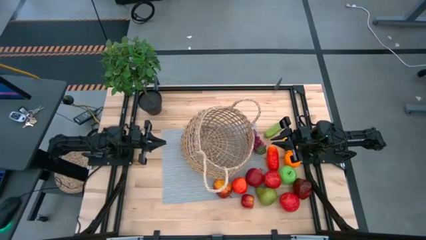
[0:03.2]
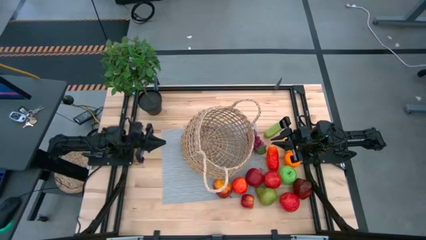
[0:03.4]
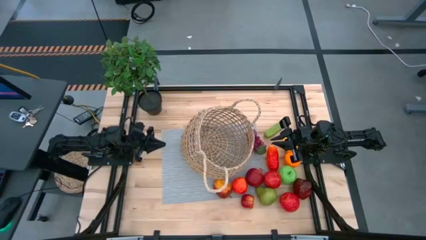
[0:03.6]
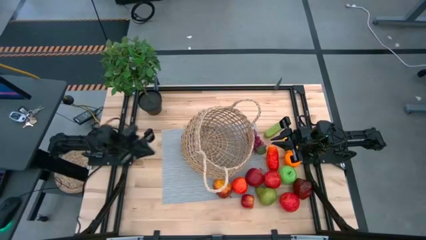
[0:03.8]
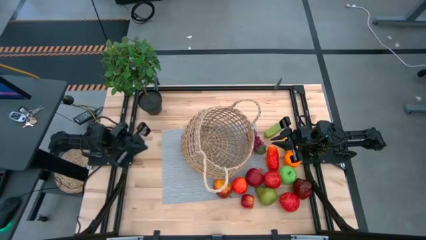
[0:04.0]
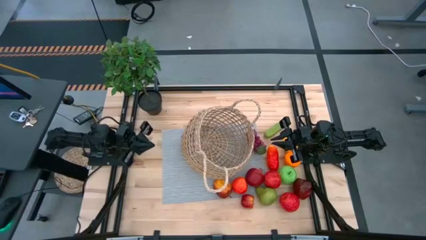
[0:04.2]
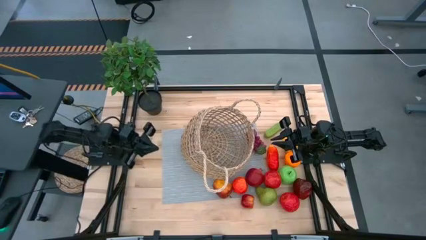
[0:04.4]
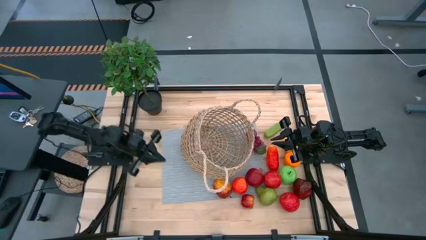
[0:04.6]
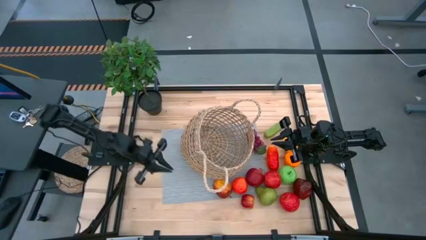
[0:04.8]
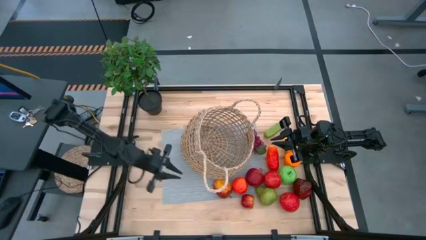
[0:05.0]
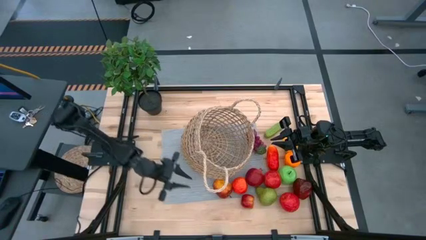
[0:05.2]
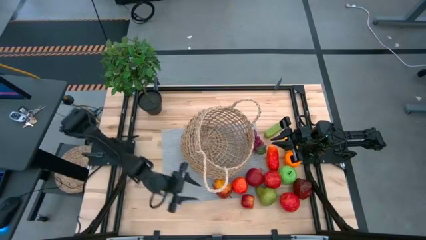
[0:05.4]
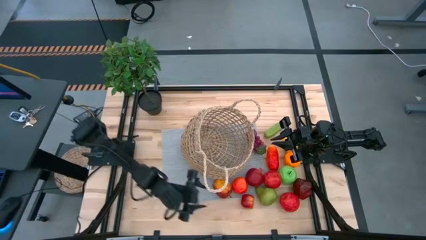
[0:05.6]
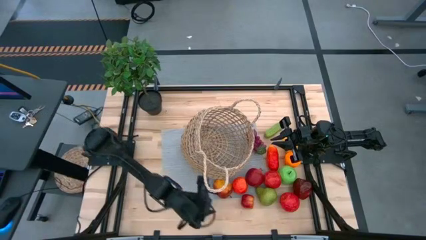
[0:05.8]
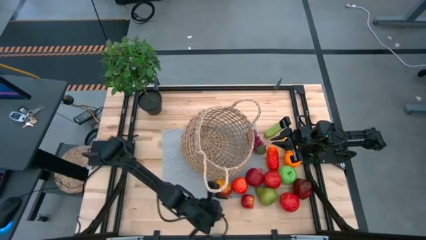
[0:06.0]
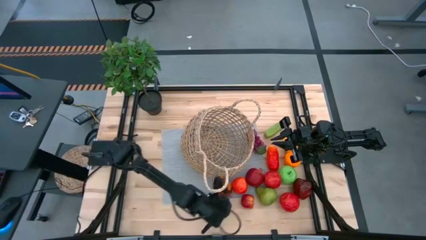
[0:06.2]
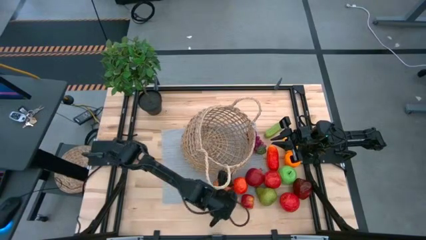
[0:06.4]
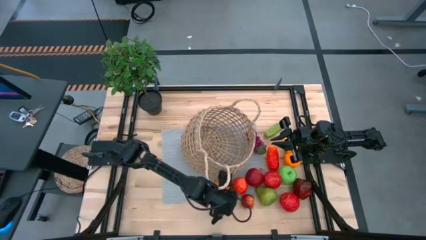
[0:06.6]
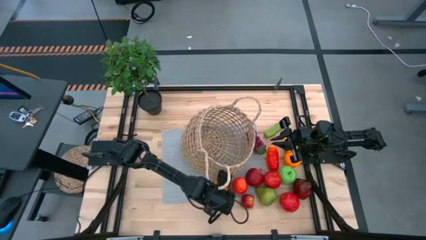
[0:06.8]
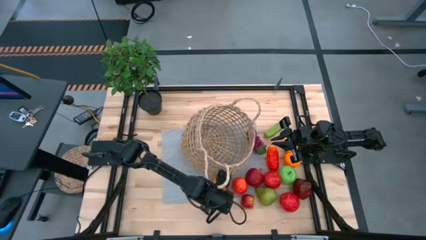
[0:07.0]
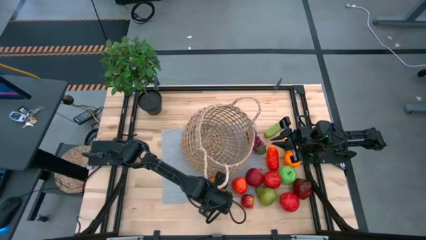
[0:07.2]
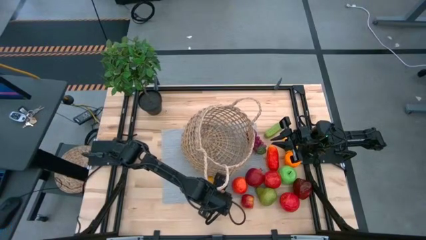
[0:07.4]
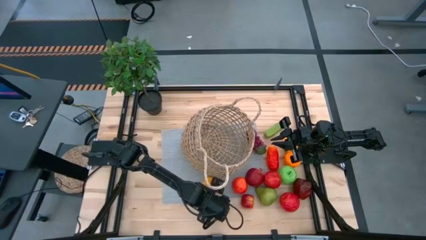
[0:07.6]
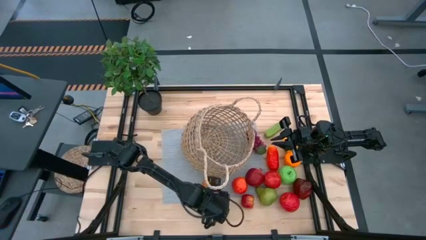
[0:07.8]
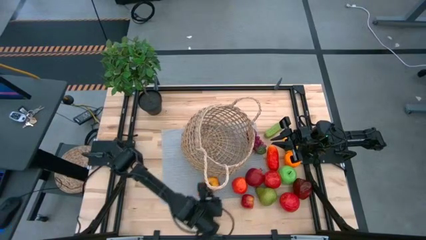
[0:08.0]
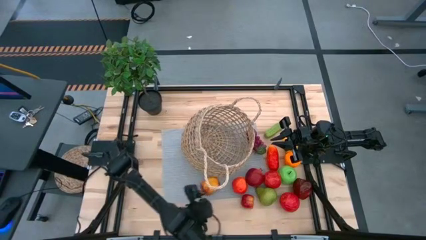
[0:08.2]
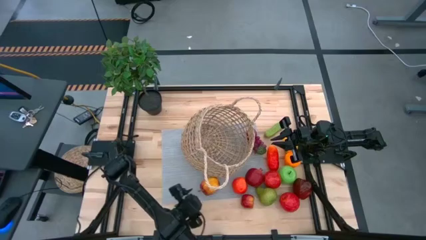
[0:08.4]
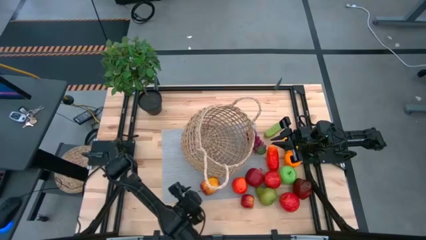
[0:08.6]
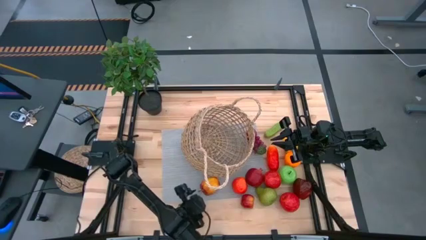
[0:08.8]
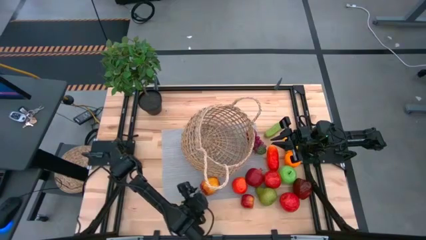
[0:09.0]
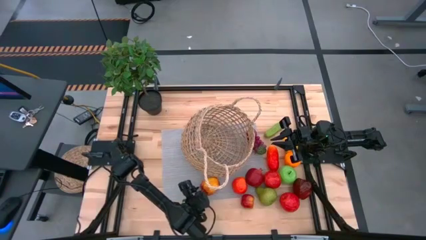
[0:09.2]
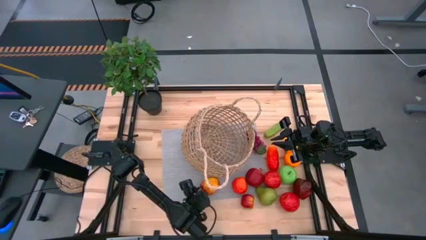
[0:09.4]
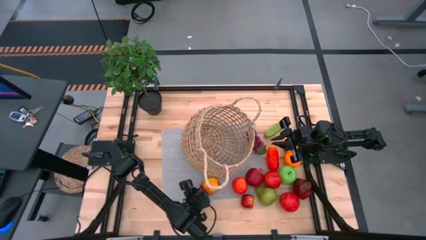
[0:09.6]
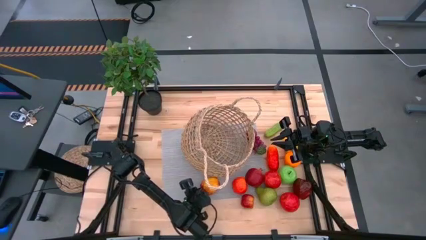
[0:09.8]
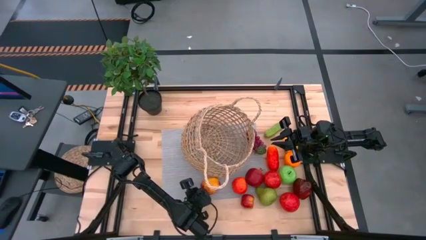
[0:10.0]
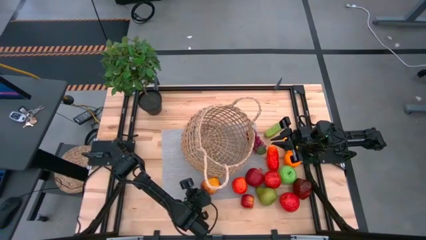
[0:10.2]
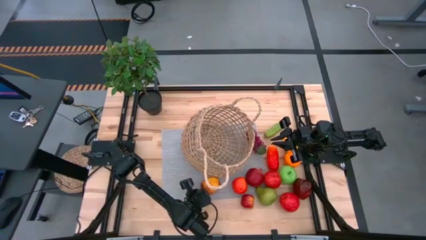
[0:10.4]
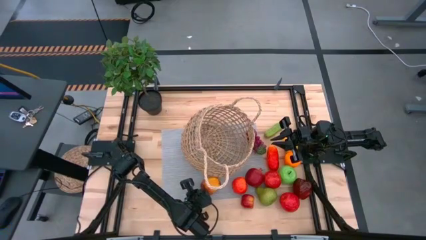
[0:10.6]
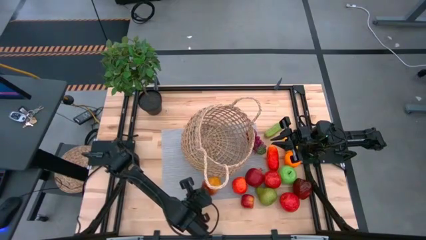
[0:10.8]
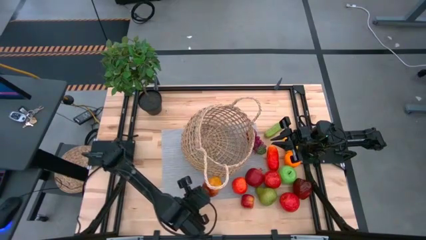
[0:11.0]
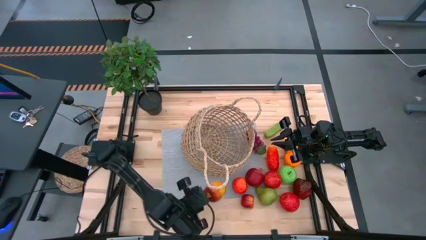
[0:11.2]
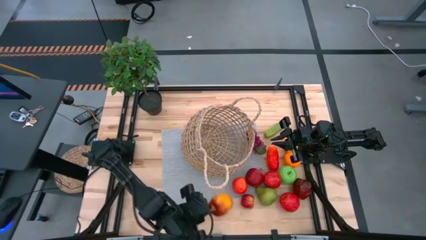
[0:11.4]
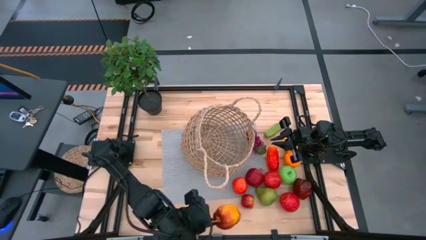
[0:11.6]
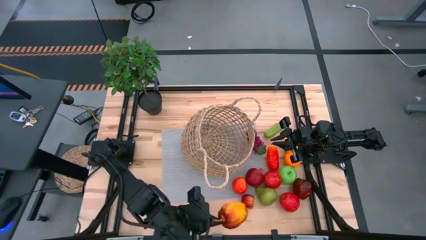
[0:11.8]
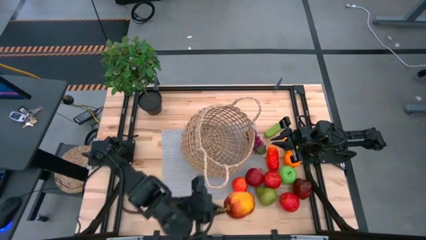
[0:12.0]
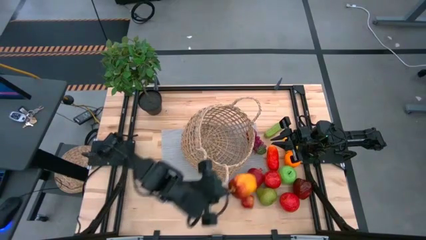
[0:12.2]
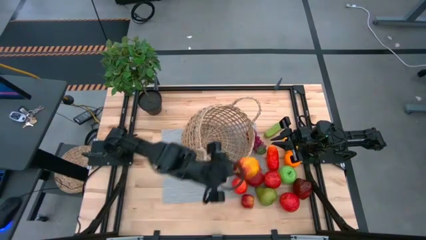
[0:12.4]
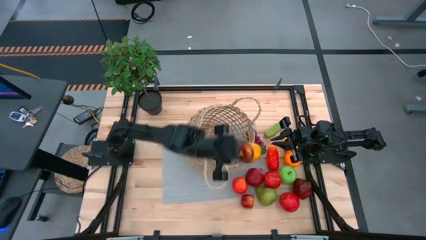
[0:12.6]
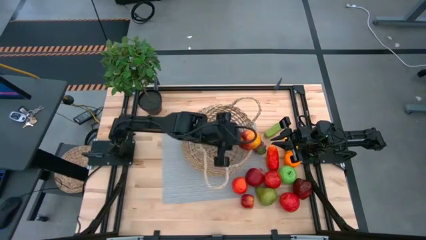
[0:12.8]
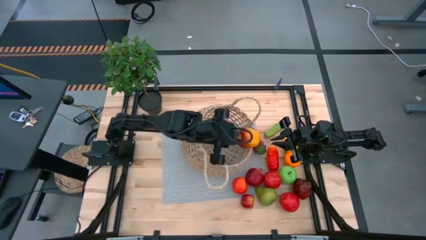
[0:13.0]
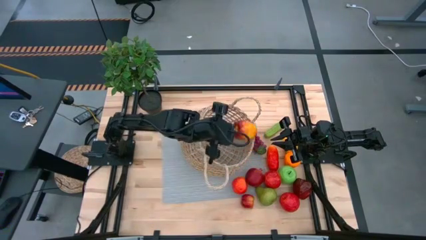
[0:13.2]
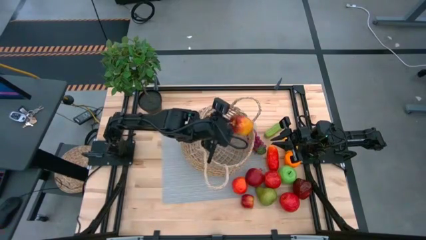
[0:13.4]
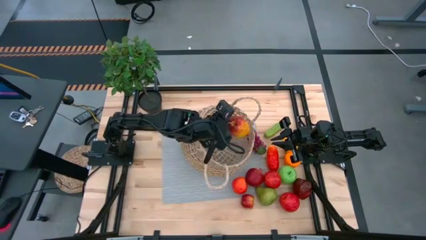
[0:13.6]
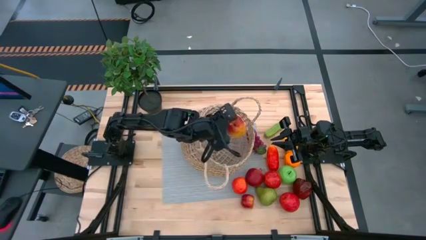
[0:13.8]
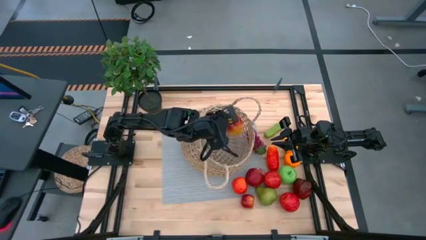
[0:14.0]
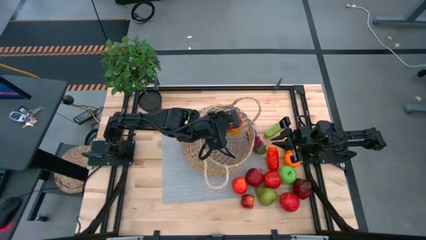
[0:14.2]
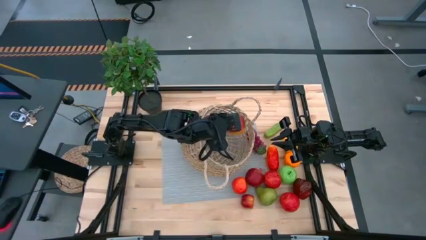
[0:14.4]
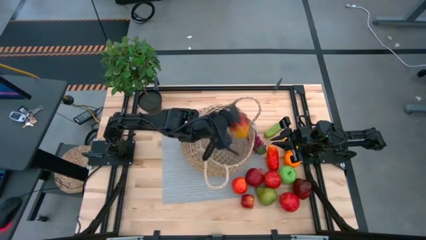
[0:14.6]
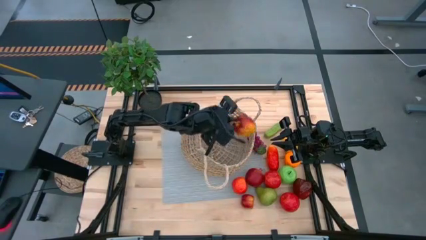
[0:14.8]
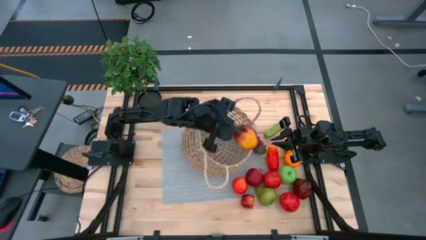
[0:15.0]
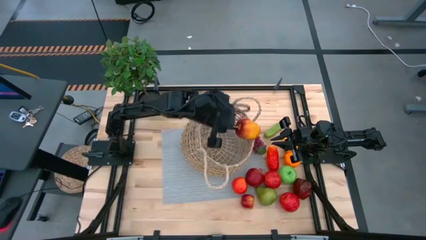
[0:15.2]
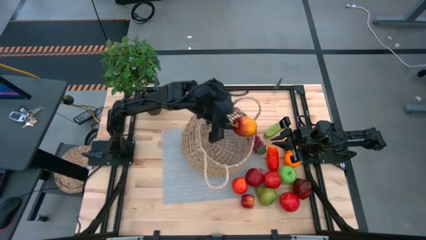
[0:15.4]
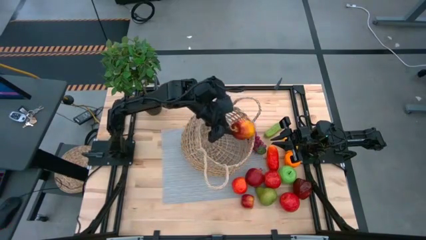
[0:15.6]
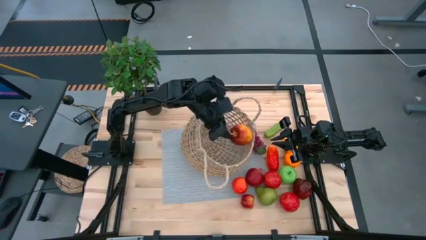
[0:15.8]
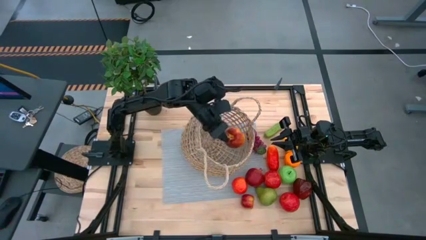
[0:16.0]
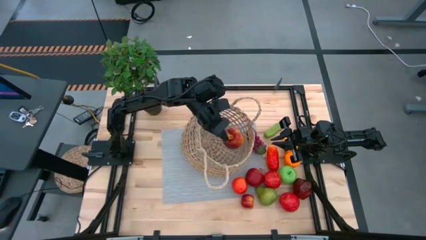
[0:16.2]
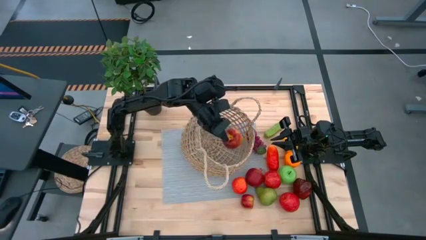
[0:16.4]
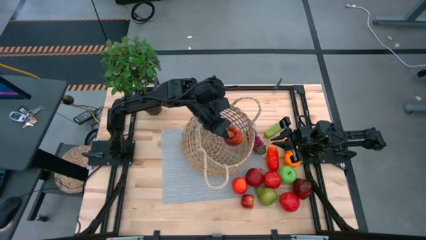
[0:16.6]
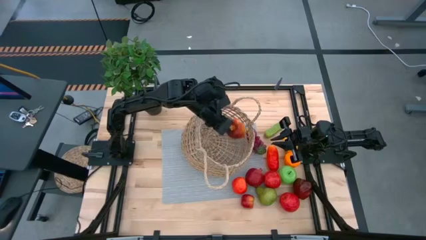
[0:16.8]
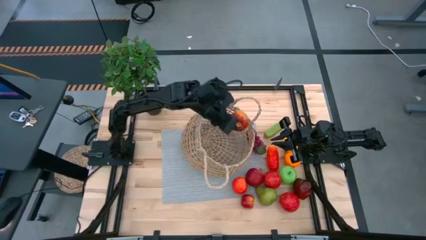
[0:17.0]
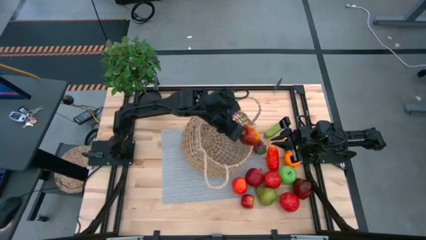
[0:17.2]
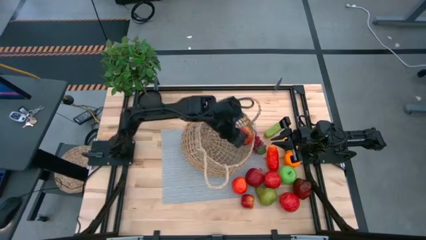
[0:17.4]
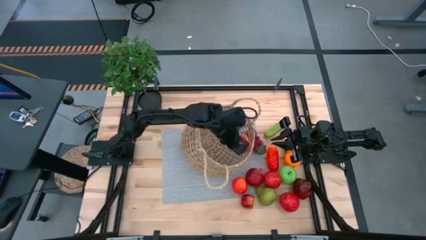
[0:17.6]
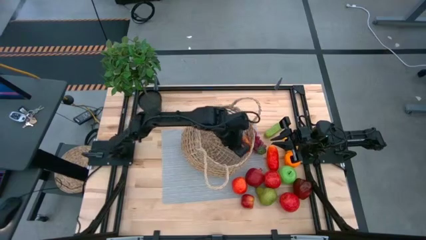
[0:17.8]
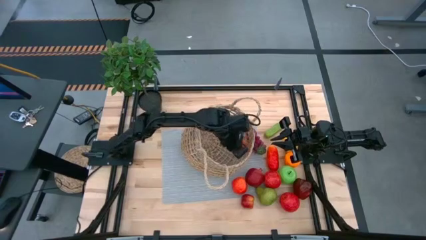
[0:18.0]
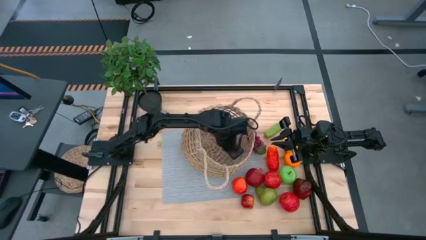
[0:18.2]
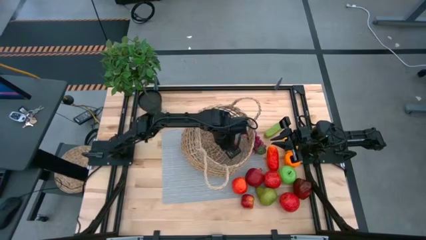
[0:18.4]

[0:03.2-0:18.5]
Task: Build produce basket
Put the red apple into the brown basket
